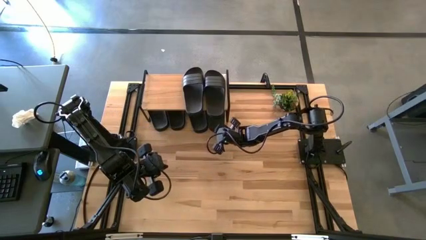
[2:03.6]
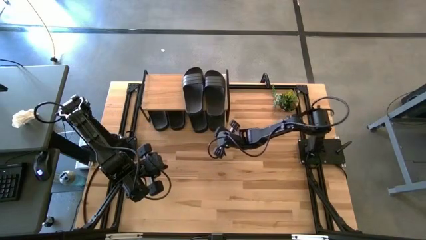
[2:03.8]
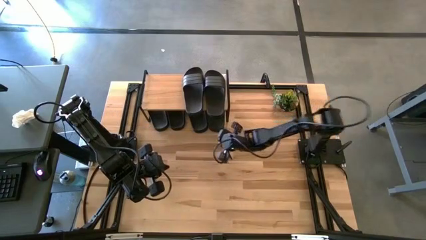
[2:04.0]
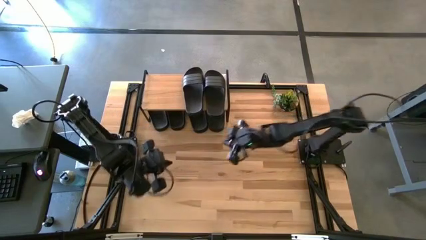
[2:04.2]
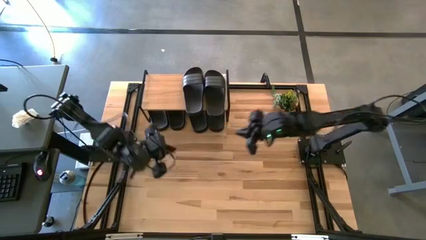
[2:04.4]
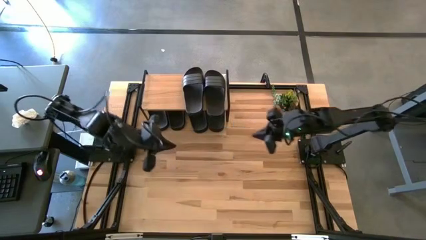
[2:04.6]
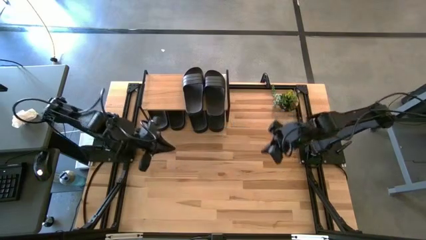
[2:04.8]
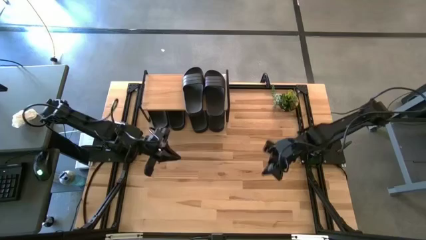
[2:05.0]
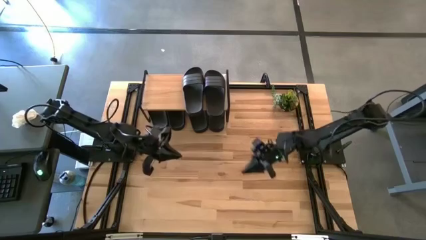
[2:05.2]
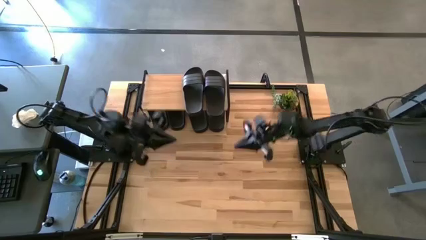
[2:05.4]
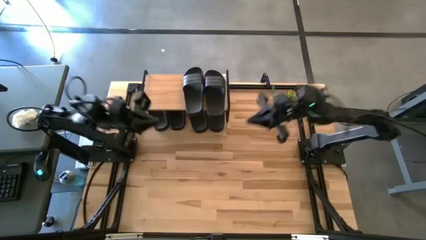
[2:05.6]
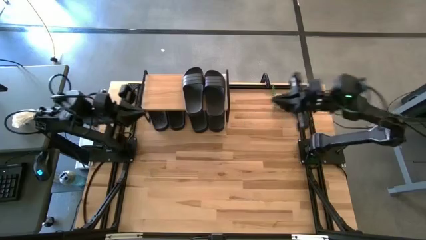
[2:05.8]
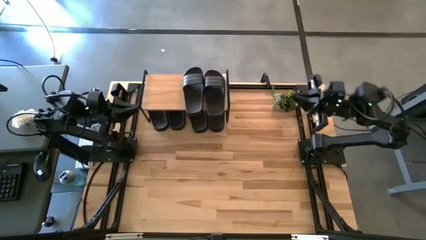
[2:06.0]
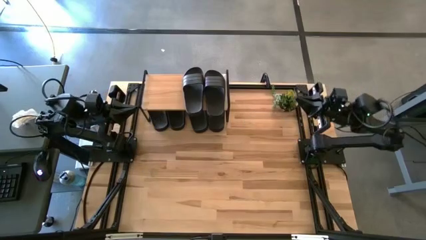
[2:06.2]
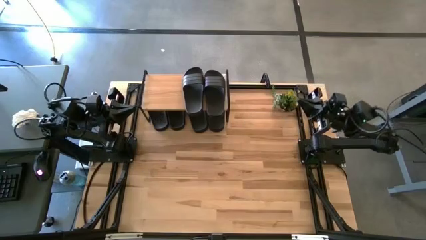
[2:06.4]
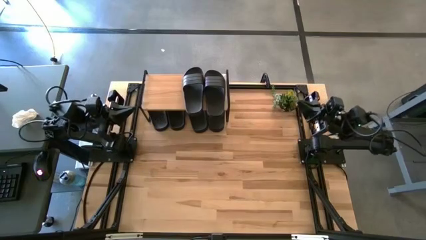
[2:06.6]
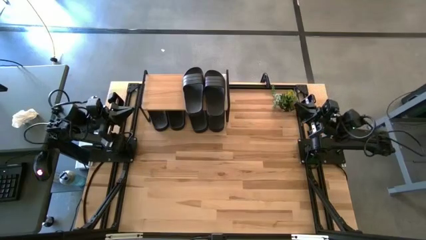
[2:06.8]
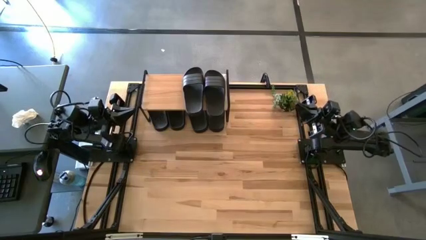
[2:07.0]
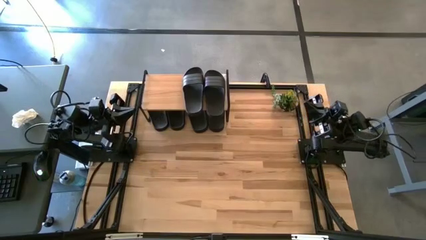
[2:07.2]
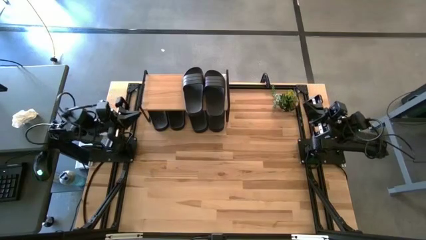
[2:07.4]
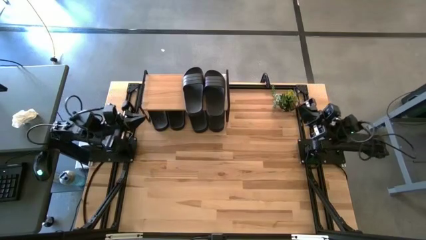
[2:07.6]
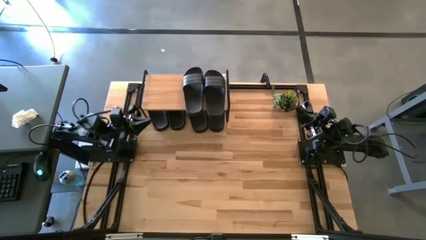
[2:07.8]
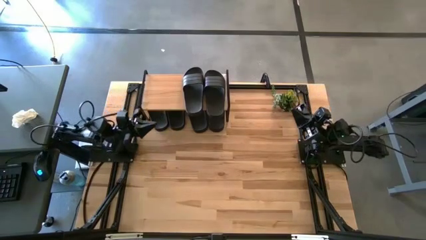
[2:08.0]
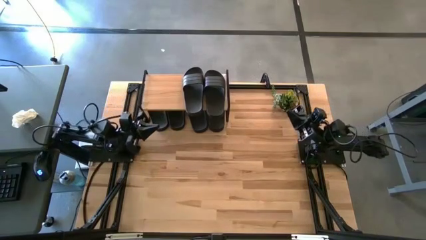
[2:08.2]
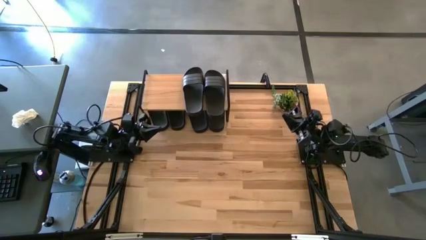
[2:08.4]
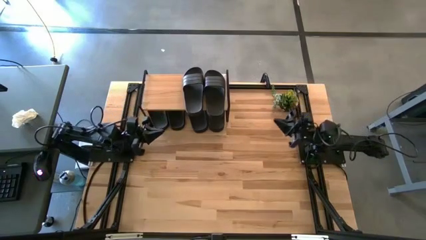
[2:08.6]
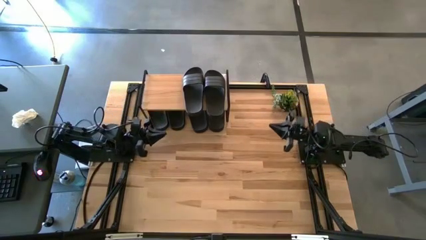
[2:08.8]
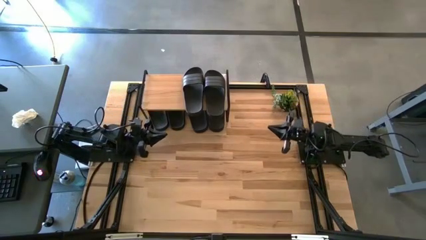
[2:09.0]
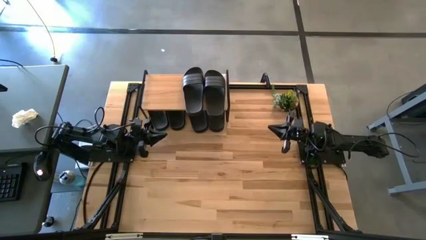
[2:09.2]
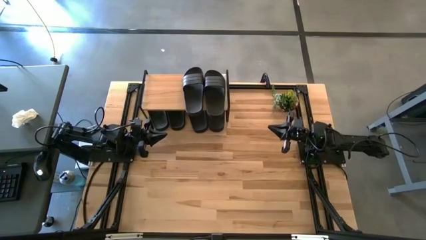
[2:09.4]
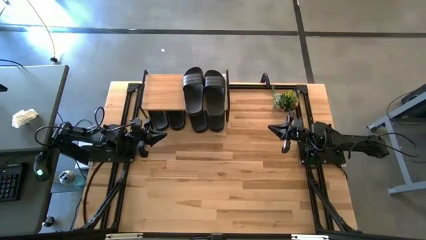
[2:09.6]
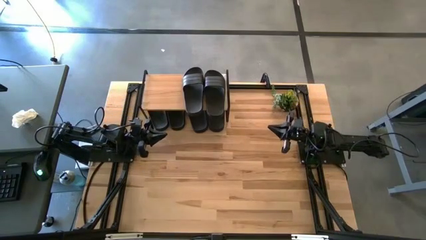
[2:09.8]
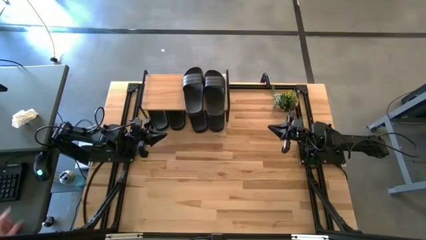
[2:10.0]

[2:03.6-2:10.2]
Task: Pick and place slides into the shelf
Return to Home Position

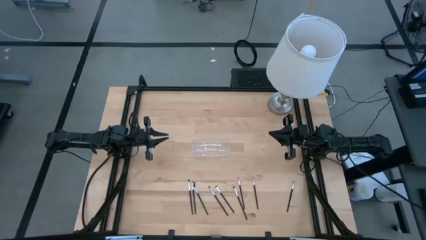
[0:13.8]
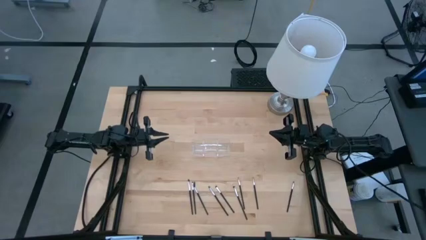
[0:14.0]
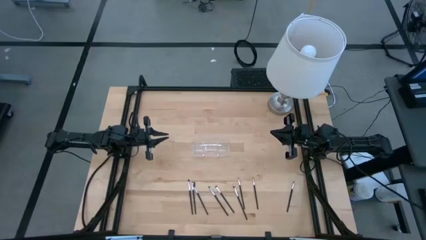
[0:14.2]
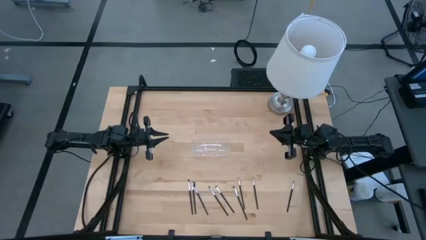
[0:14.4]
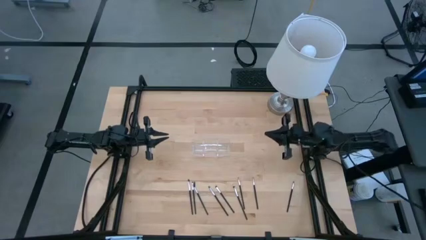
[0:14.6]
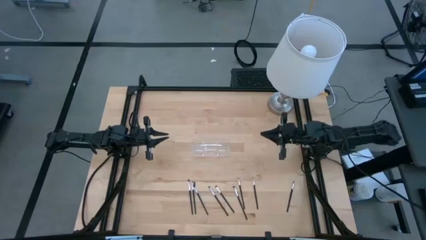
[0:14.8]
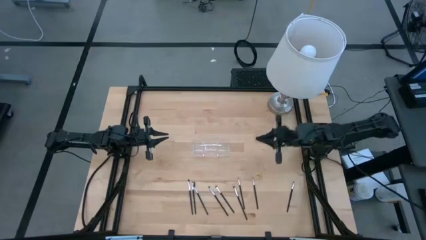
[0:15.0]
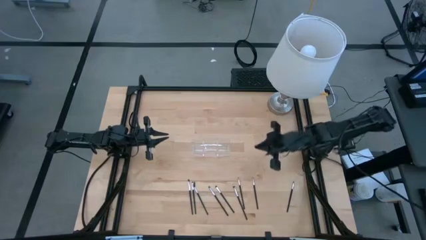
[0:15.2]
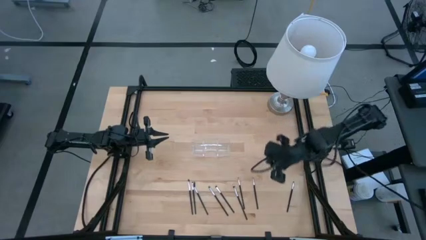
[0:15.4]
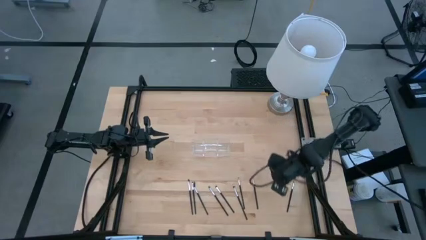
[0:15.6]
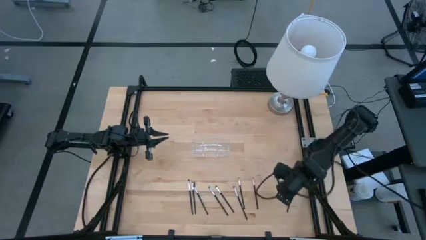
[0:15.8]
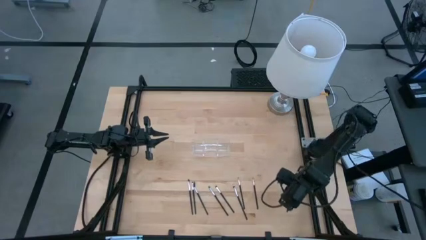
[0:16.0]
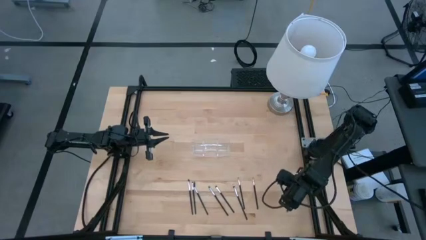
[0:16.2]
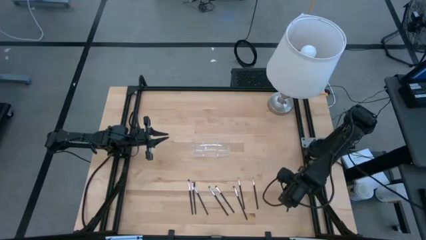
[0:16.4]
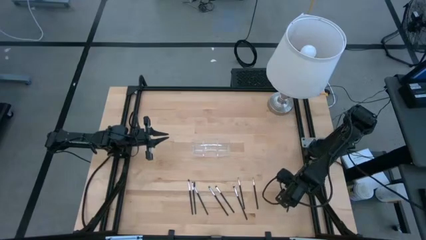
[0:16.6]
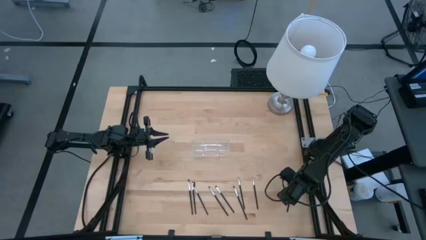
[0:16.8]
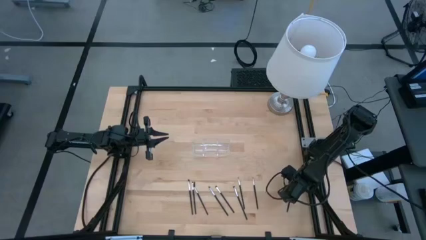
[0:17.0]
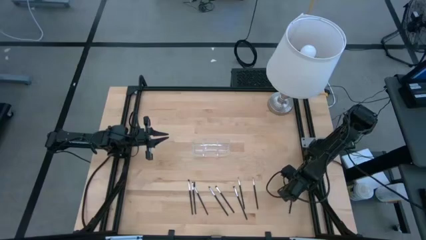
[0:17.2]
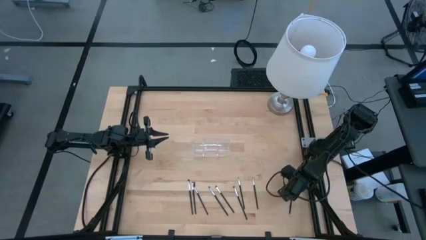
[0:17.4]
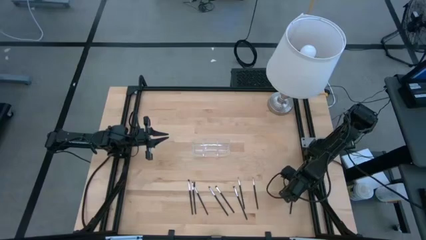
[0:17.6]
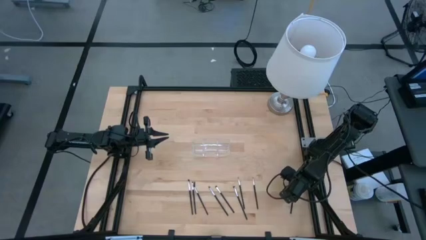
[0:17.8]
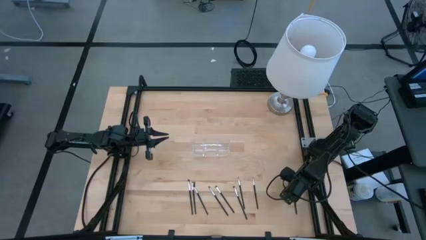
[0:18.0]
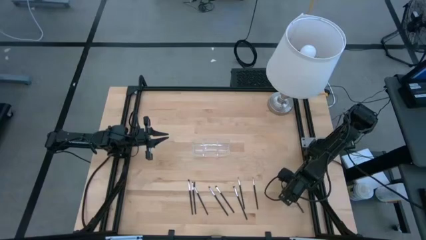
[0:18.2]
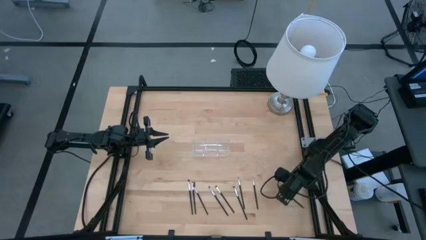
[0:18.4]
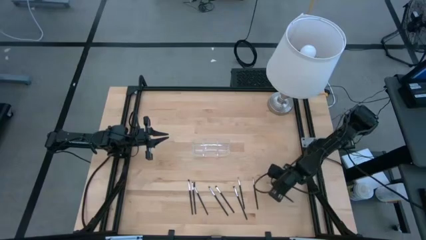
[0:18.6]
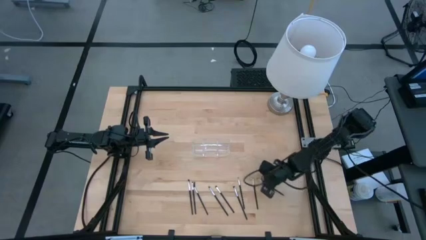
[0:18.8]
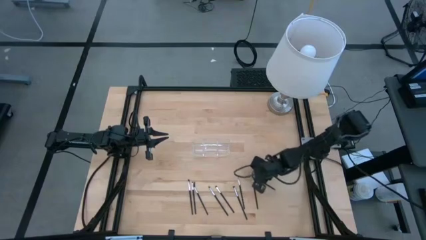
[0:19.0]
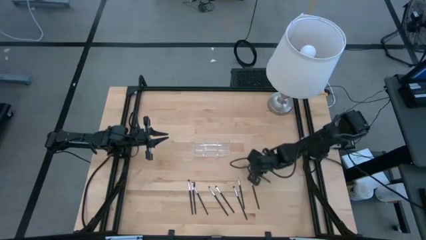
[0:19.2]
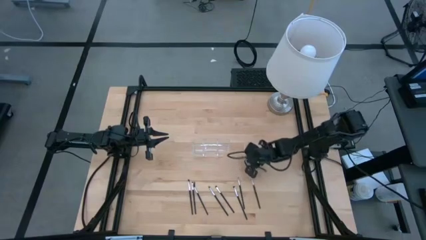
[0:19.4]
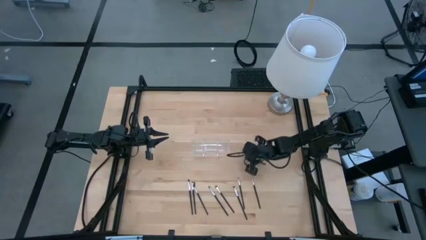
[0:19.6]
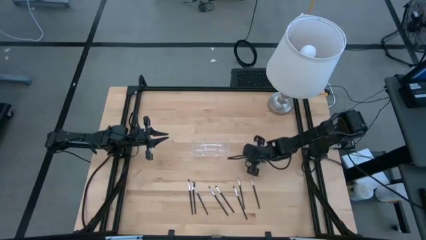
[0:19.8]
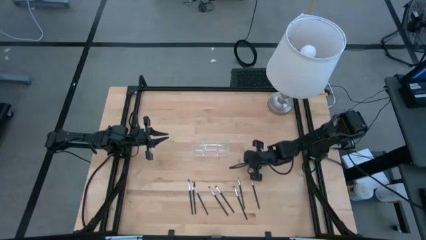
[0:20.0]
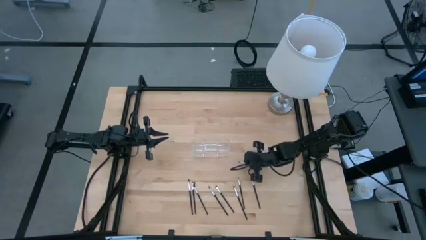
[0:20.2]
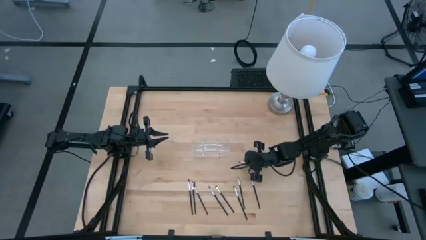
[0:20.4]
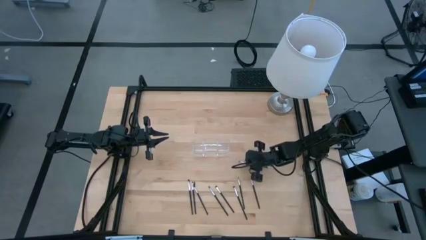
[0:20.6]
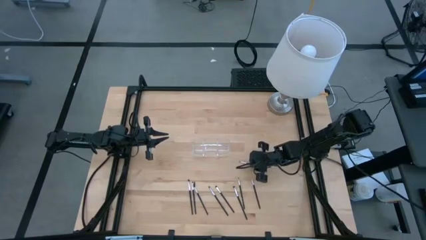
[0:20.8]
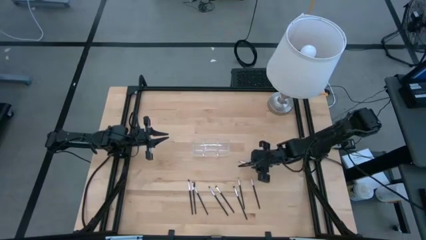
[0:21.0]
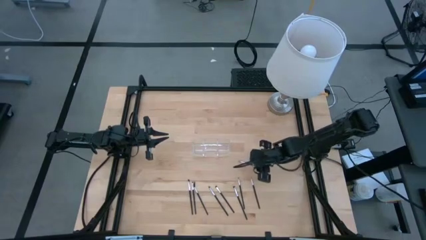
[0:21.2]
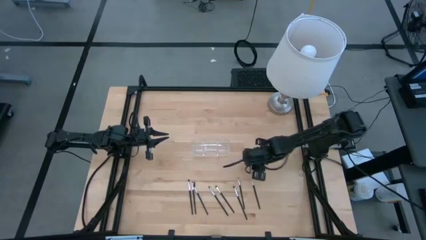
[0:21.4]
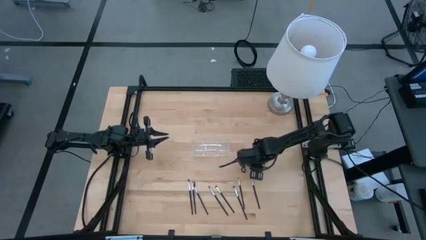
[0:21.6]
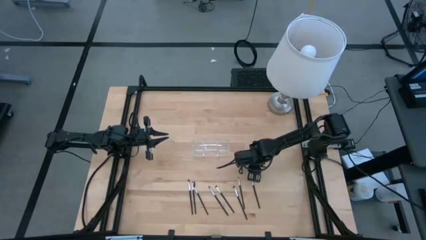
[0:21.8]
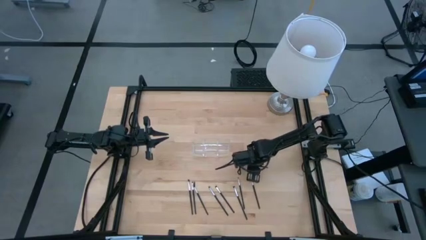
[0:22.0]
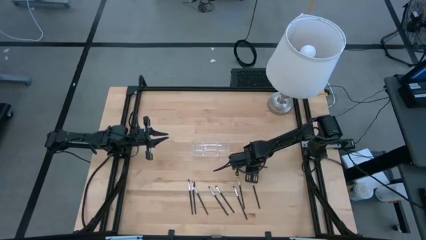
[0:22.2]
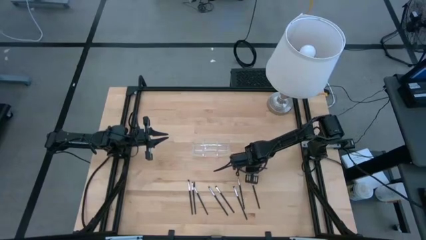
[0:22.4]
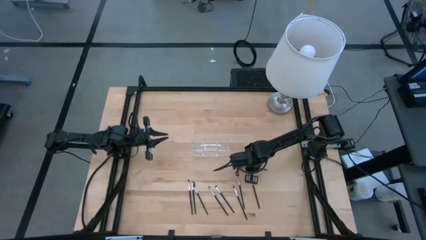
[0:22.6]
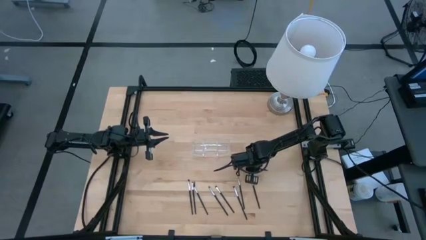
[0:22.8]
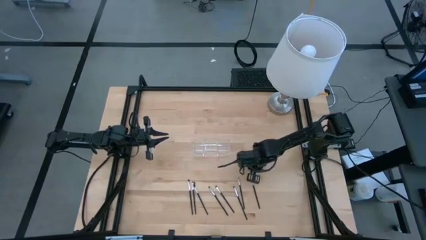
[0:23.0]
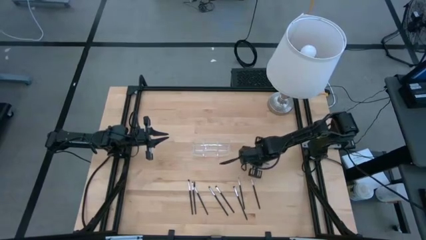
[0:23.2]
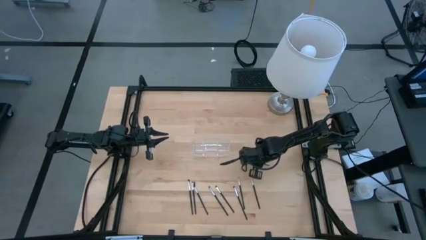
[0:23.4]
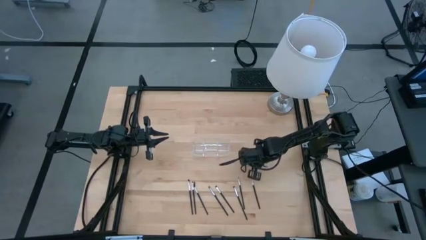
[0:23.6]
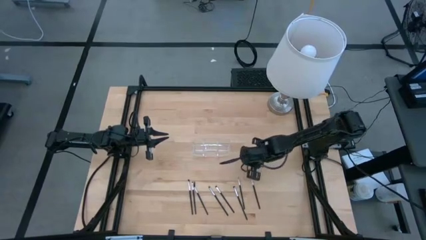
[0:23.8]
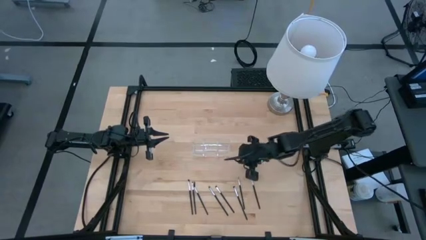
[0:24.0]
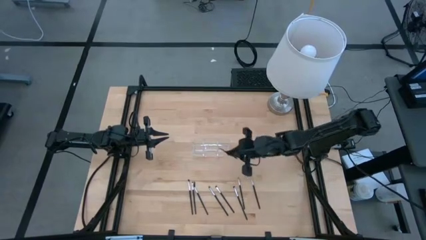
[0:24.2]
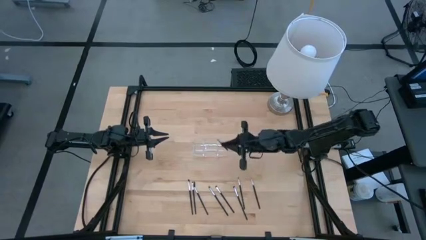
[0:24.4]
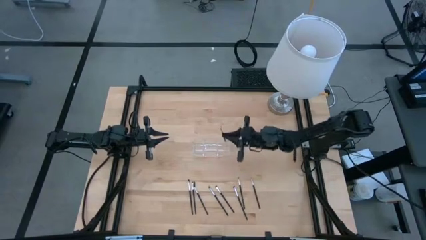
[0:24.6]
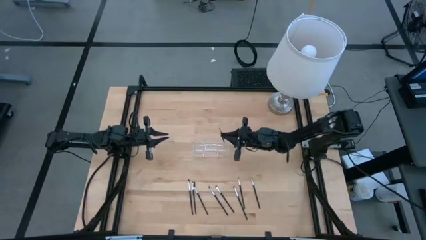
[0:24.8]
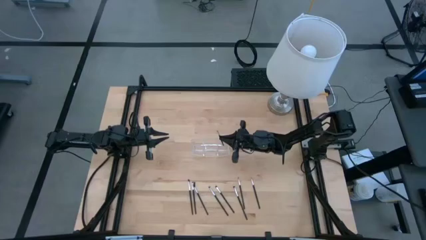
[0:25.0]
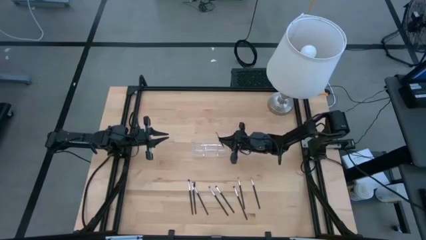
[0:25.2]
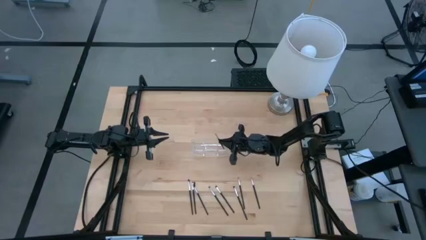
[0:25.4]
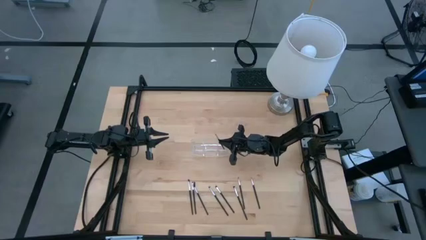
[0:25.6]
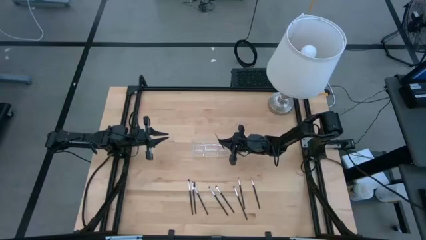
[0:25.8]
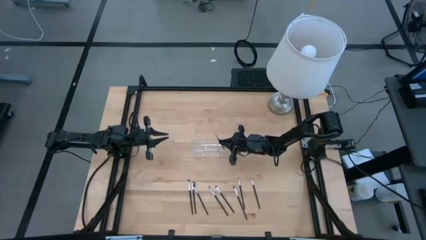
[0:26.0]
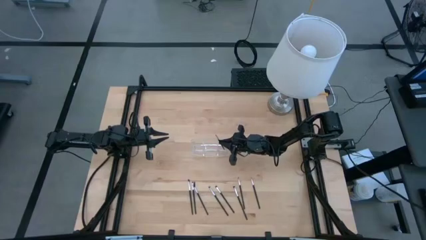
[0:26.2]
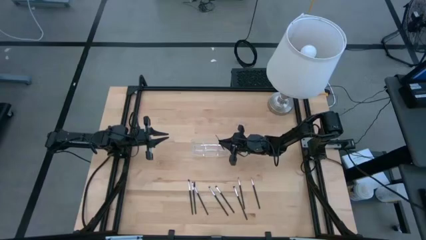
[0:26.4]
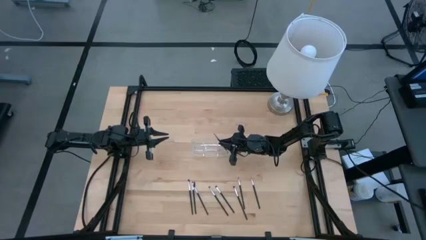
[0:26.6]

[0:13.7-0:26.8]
Task: Put items in baskets/containers
Put the eyeshadow brush in the transparent organizer
